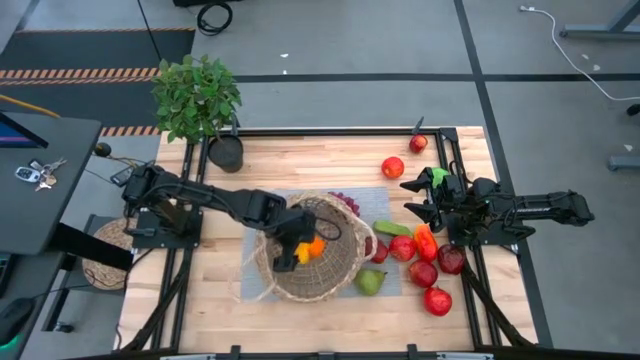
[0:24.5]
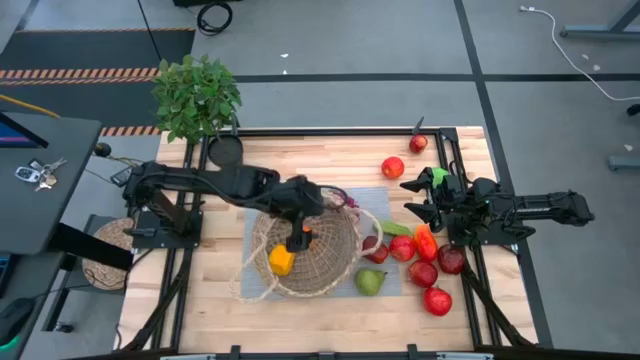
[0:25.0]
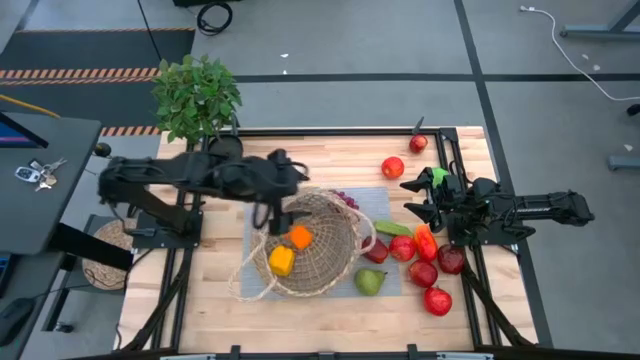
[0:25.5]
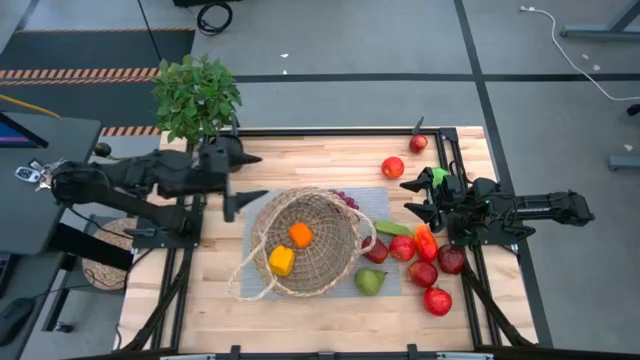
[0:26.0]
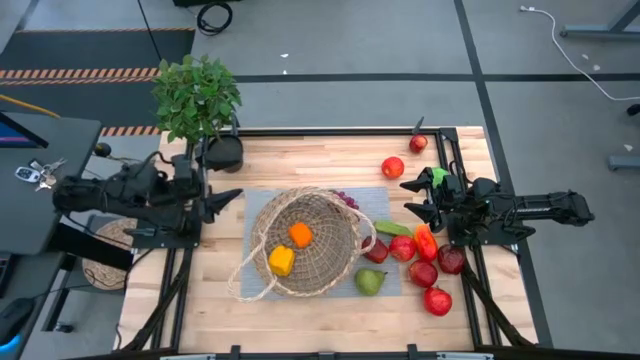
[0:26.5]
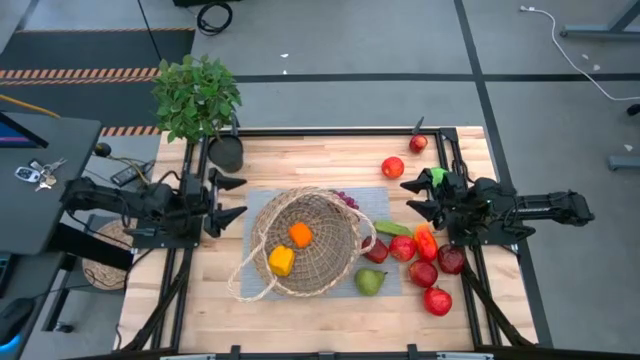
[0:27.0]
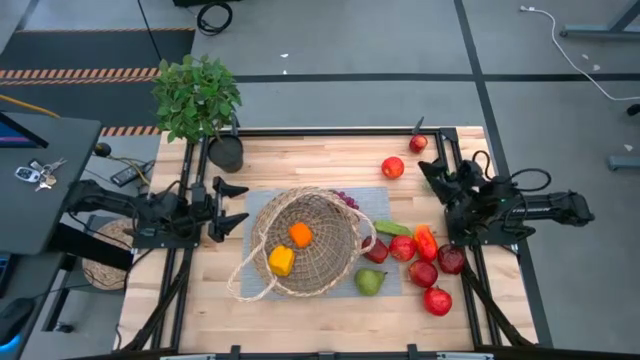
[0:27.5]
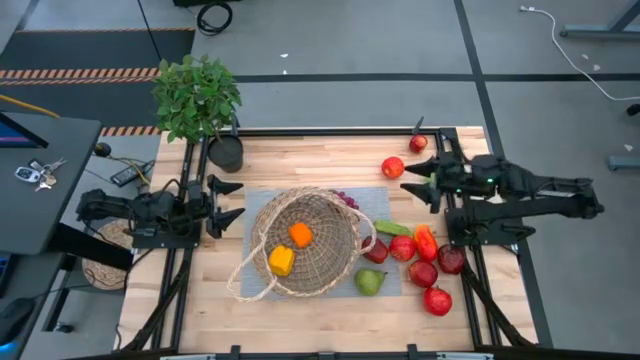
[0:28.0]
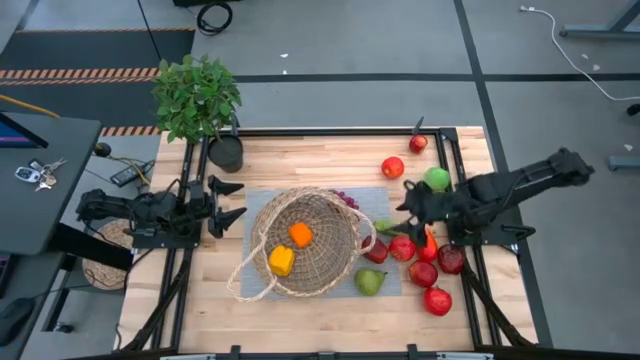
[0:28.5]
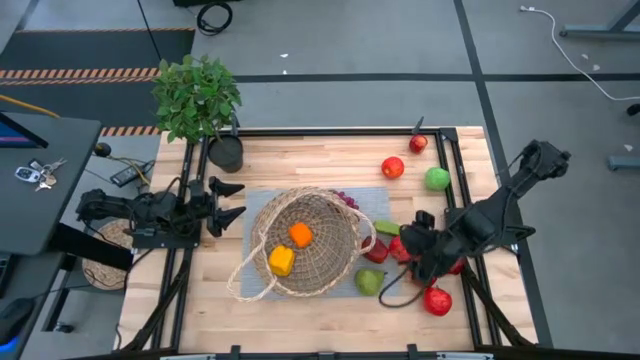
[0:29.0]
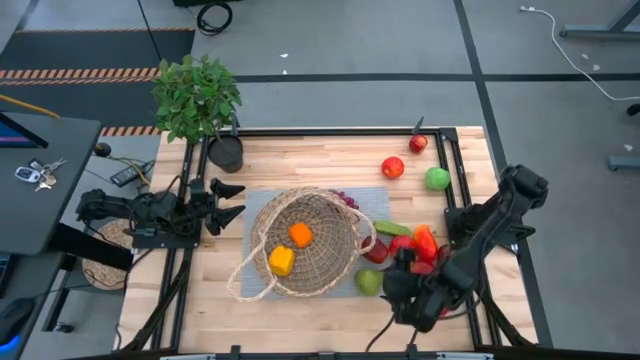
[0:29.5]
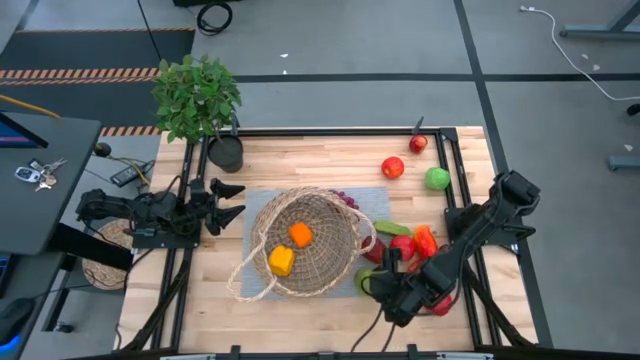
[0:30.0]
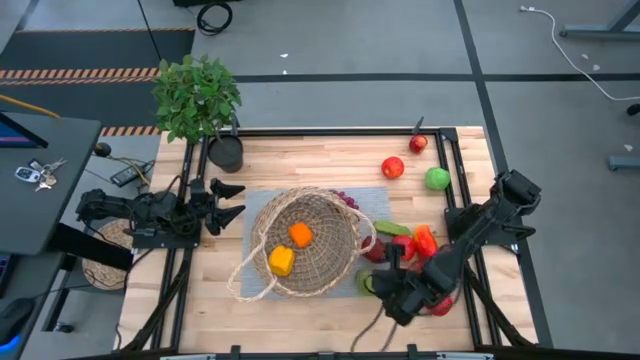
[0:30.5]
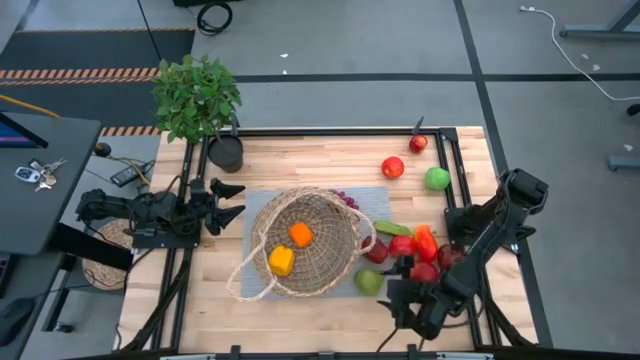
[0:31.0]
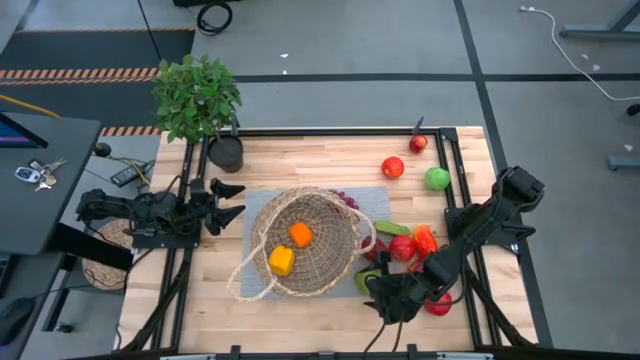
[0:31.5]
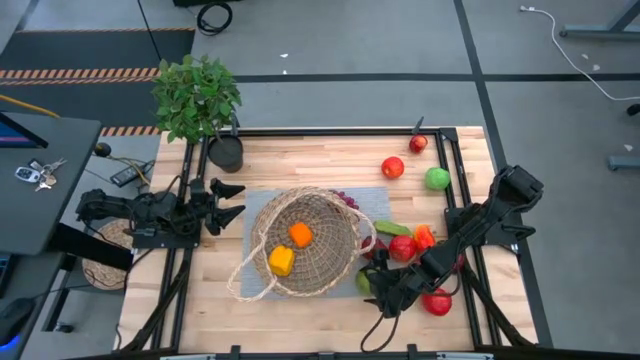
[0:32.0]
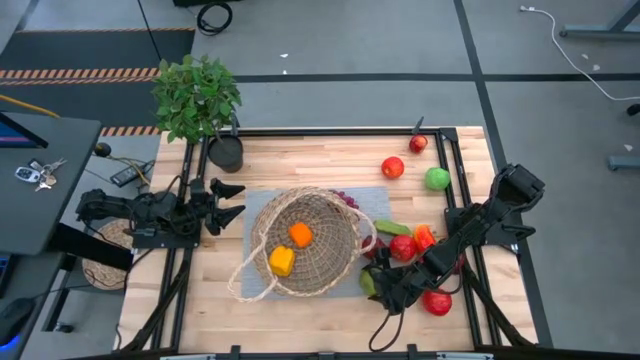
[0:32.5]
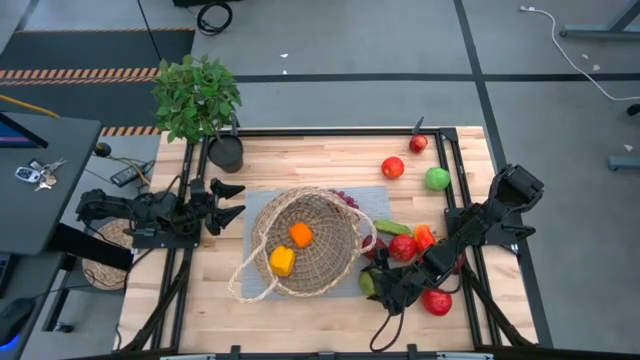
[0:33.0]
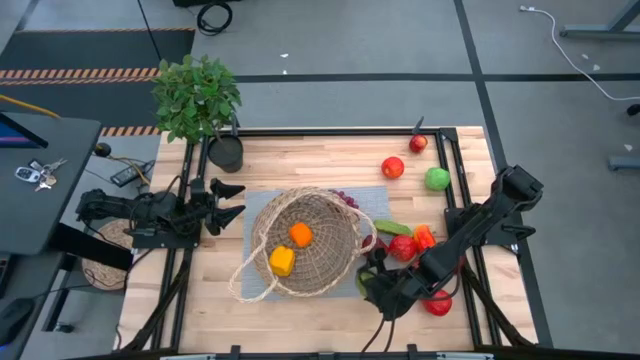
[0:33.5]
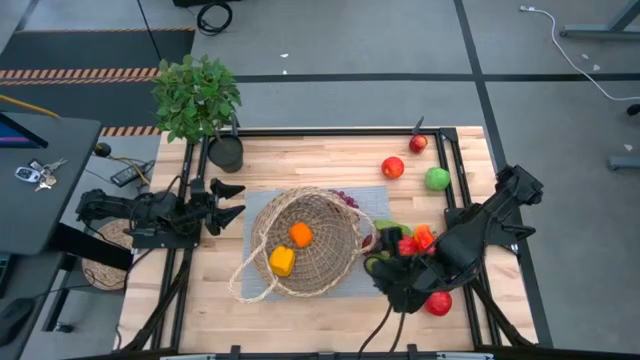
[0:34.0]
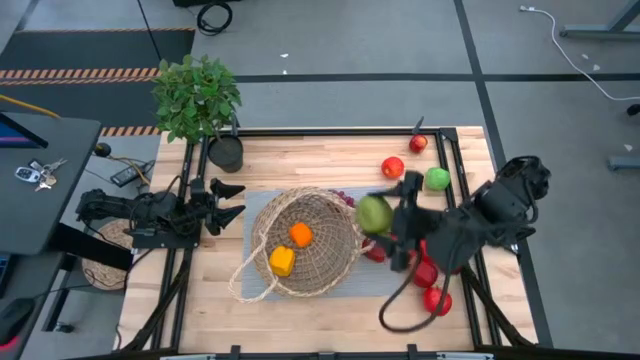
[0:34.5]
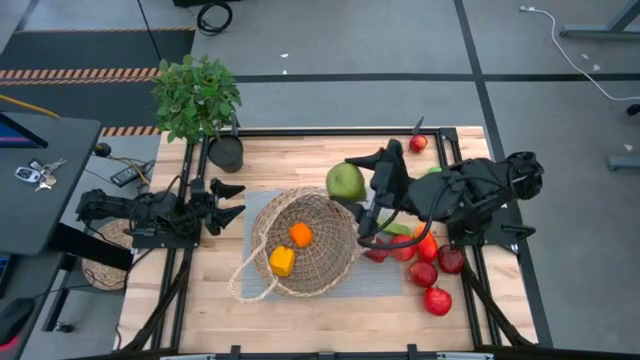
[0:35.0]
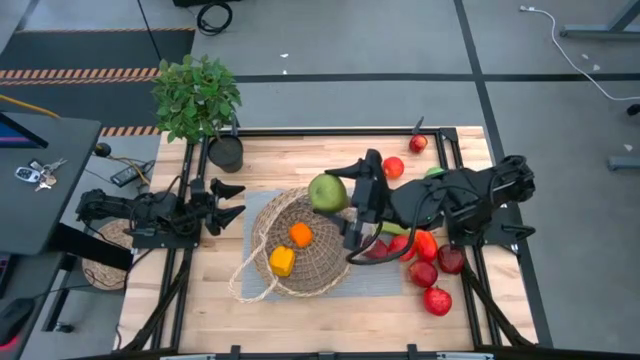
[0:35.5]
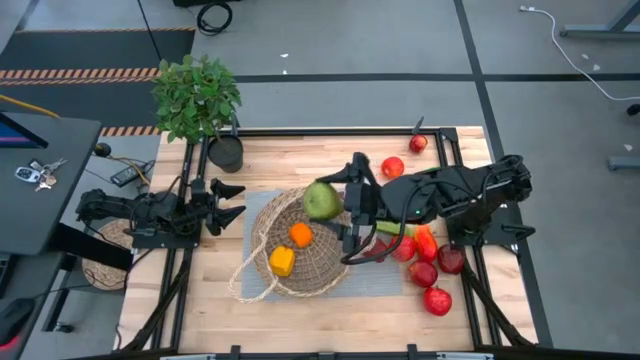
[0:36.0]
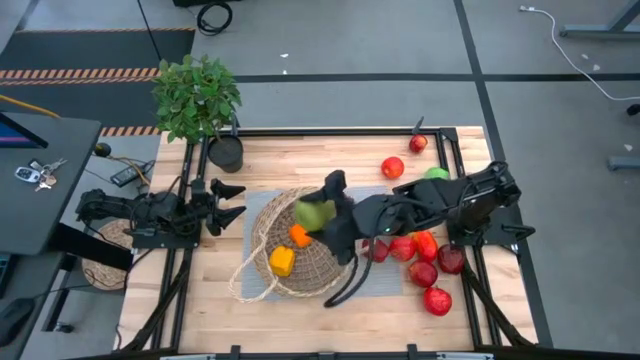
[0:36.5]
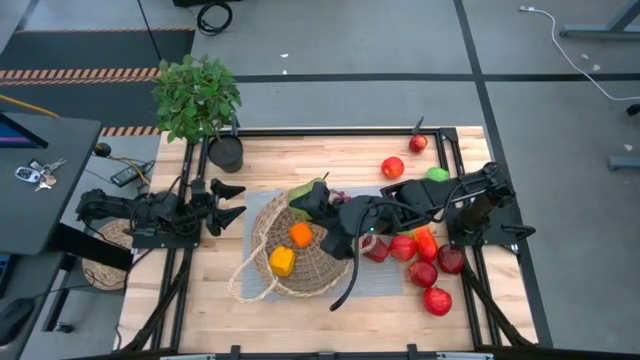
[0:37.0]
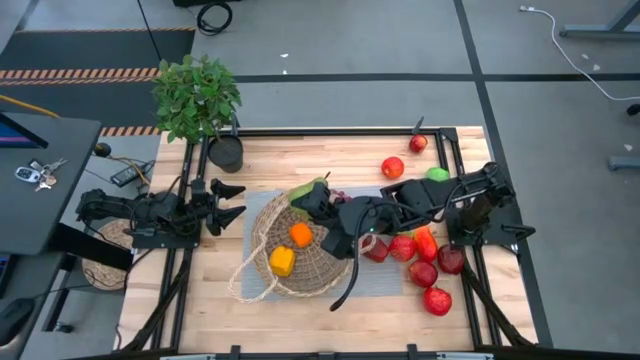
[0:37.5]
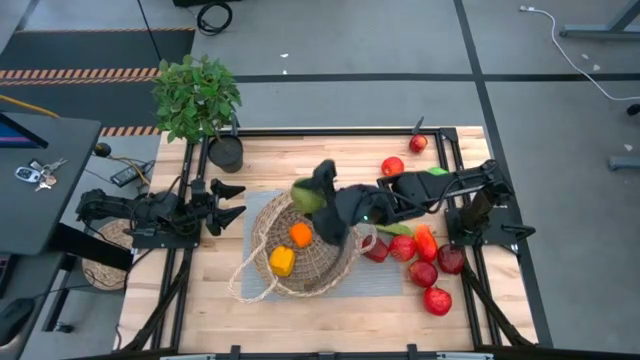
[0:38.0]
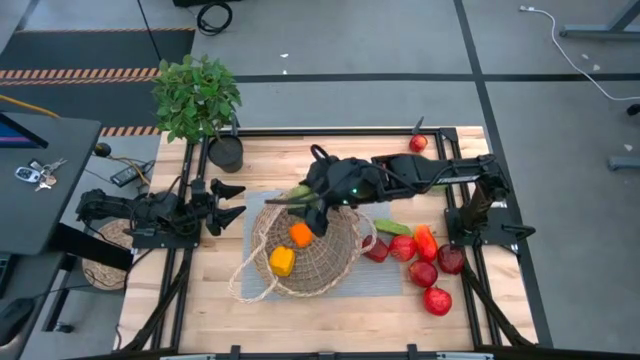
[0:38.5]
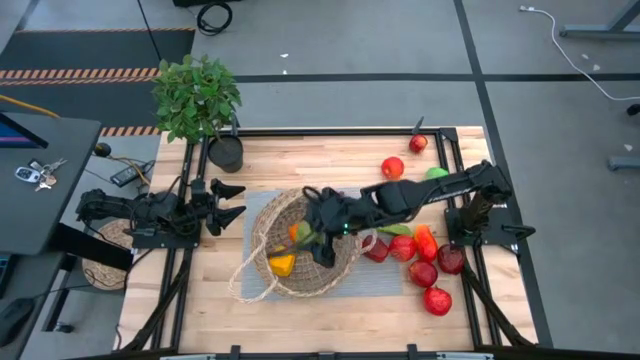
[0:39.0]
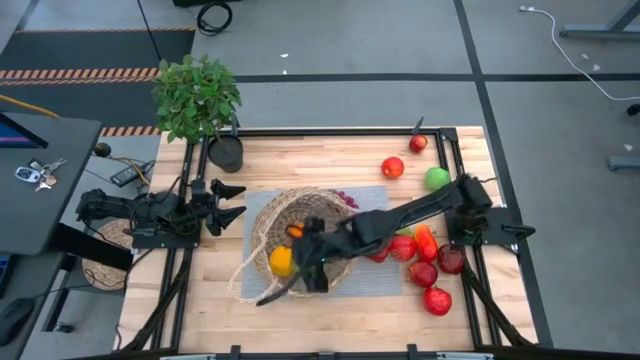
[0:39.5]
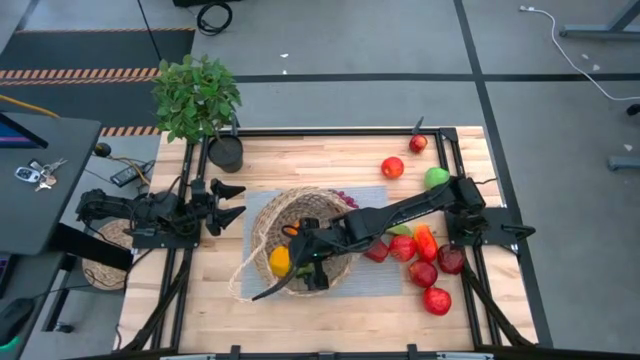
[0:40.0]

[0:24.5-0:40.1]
Task: Build produce basket
Put the green pear into the brown basket

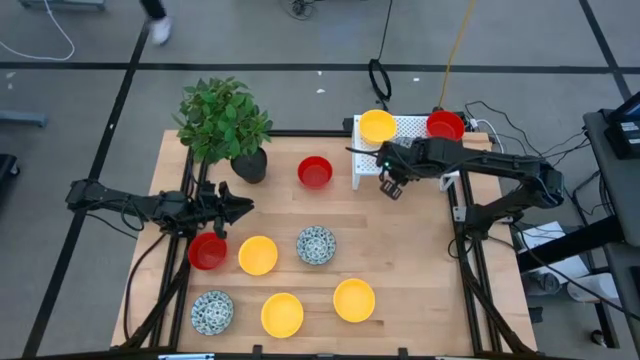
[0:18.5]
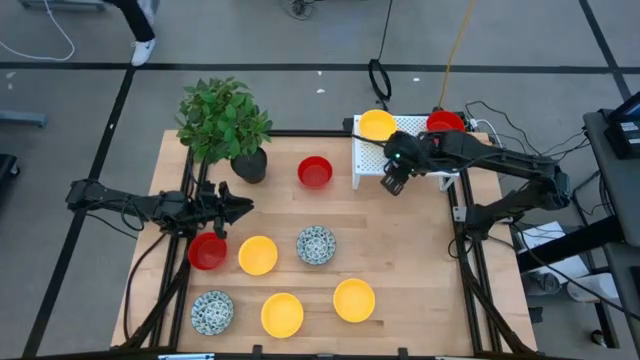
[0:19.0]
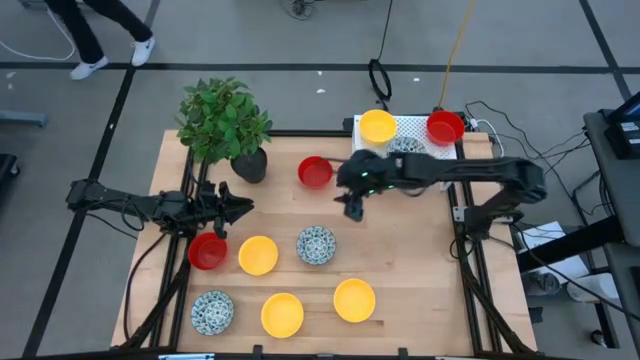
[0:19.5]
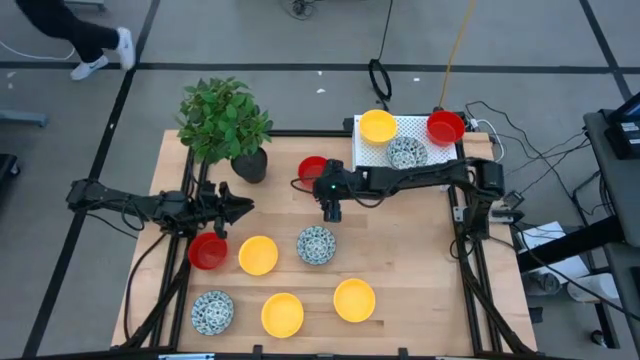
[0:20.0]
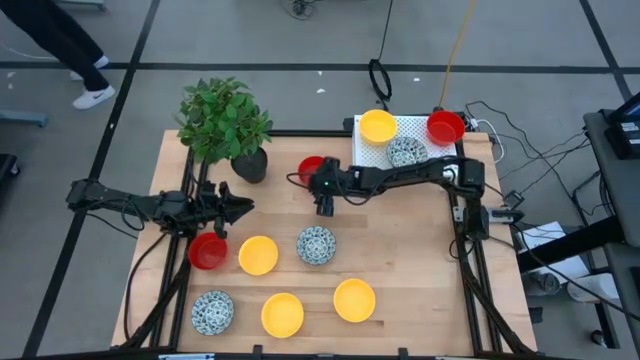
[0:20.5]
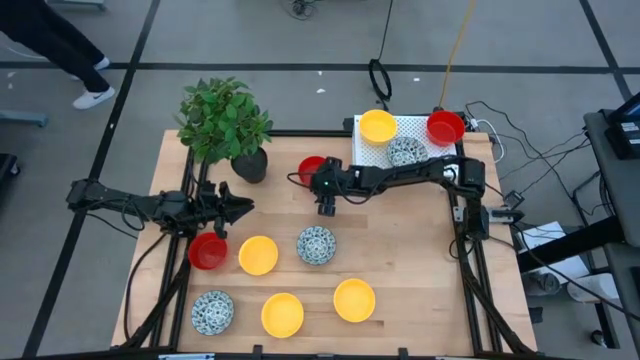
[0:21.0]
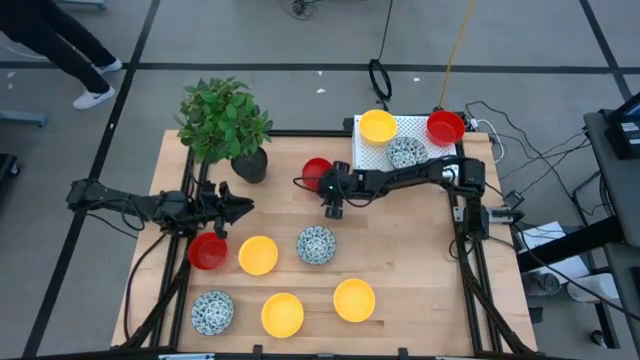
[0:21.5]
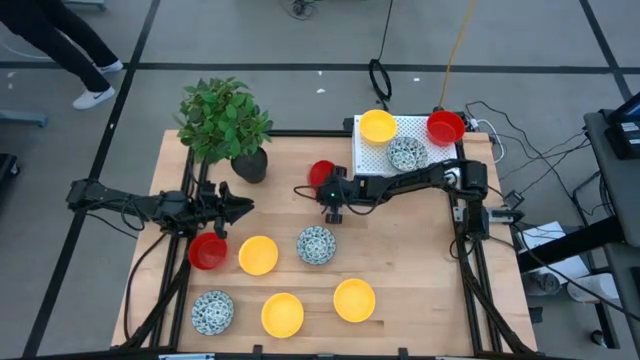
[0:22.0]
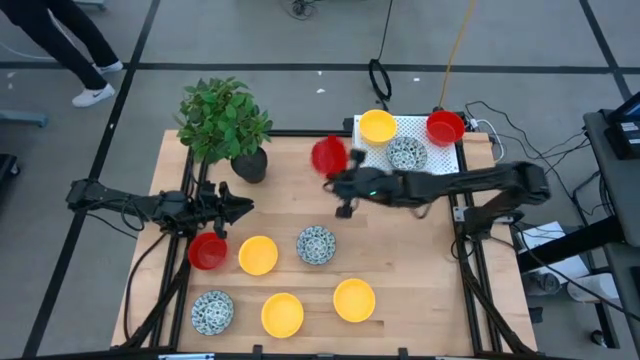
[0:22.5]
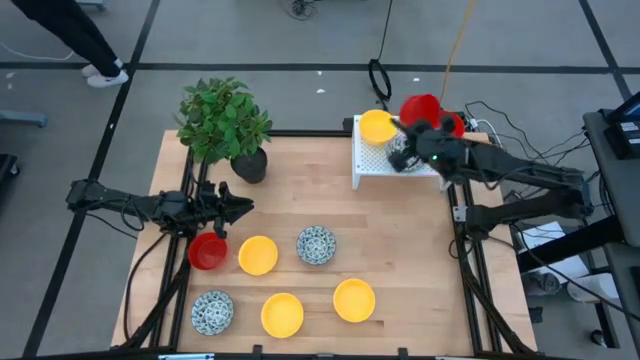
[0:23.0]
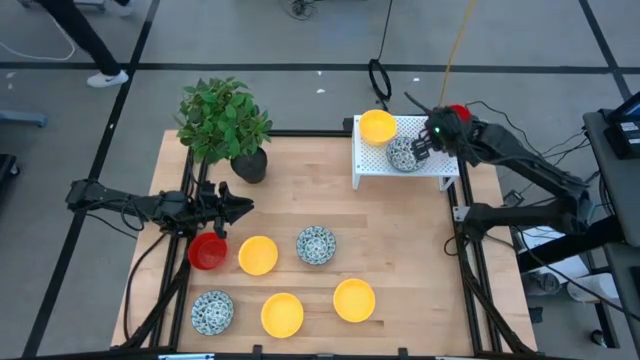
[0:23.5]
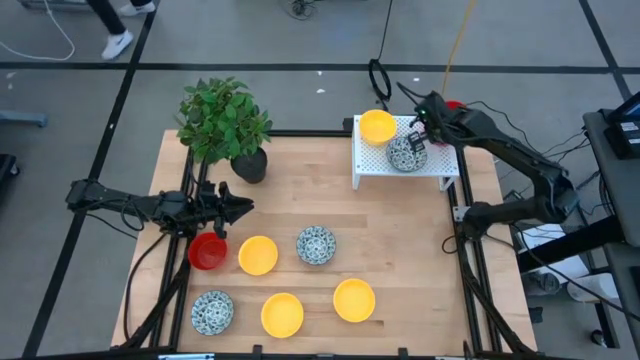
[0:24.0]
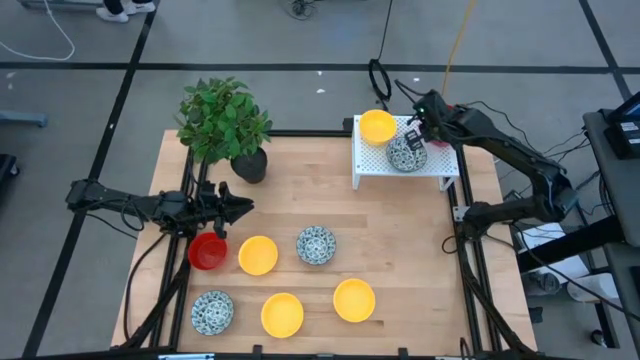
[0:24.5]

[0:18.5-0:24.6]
Task: Pick & Place Mini bowls
Stack the red bowl on top of the red bowl on the shelf
